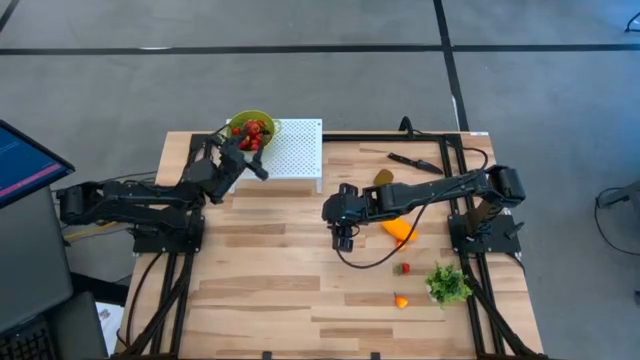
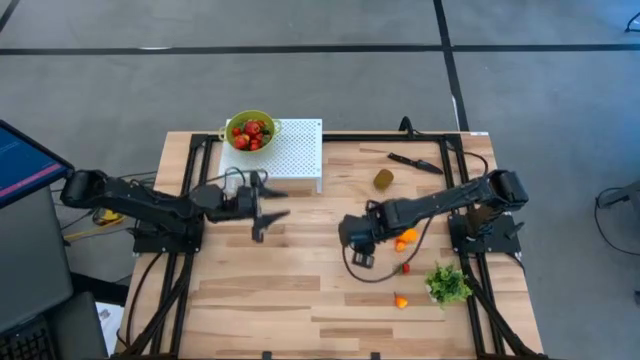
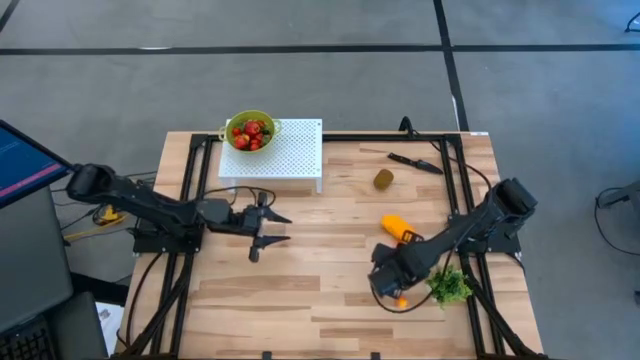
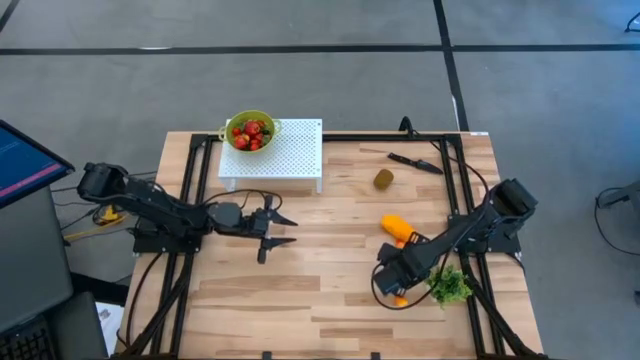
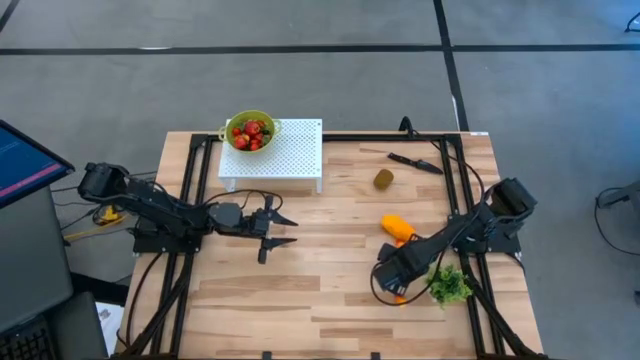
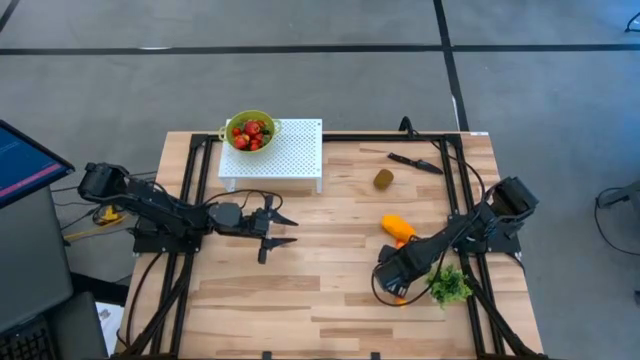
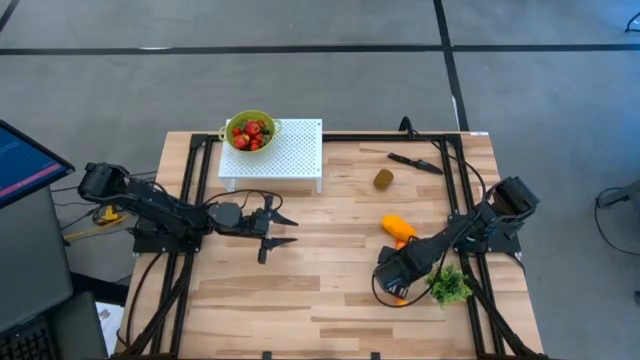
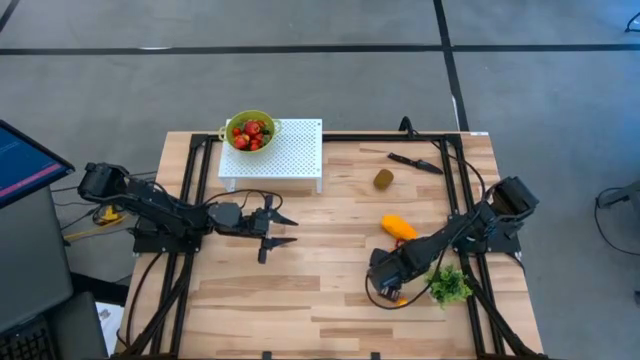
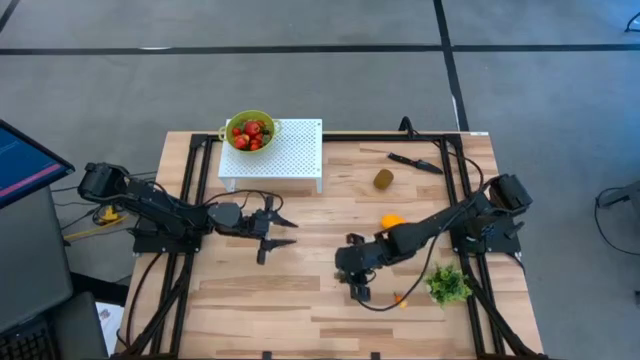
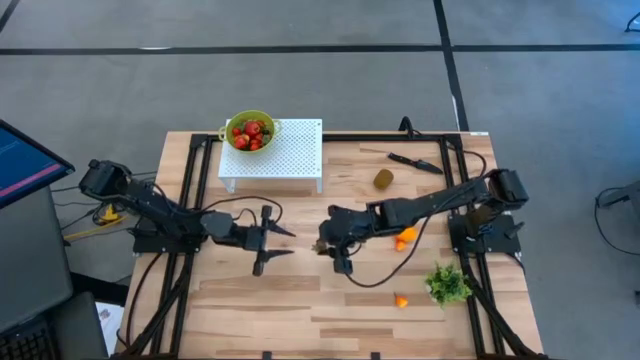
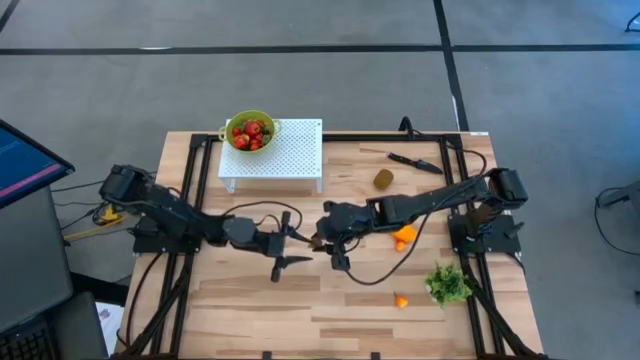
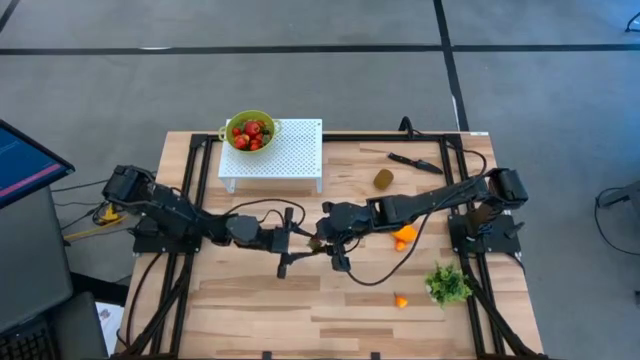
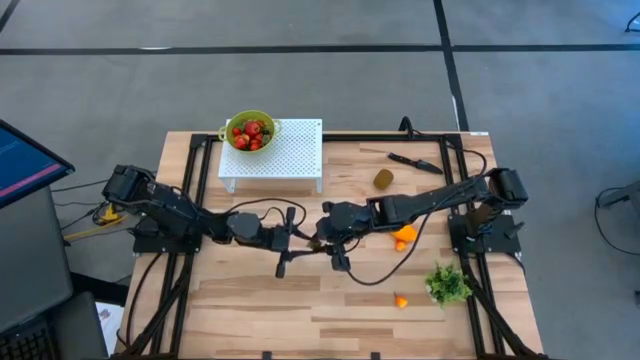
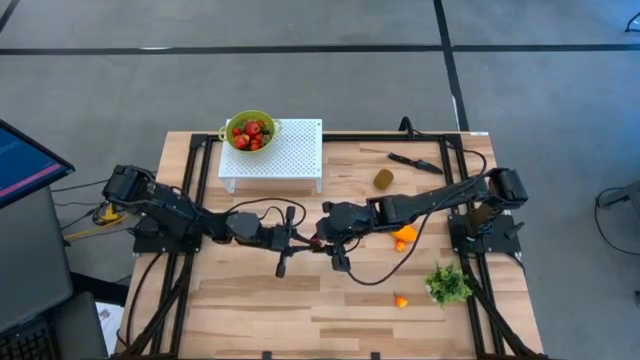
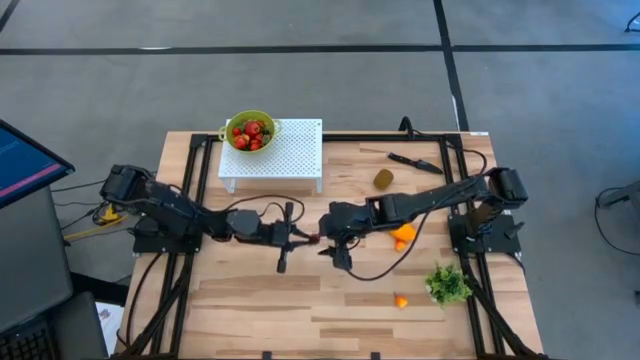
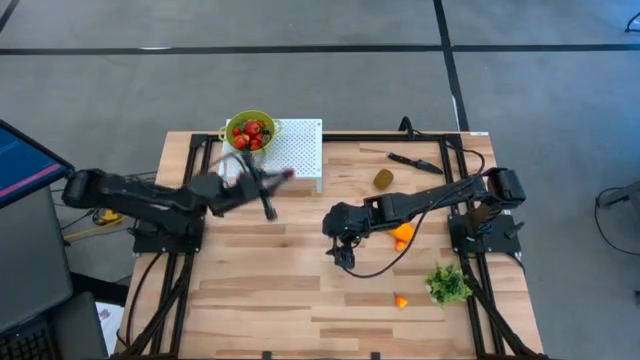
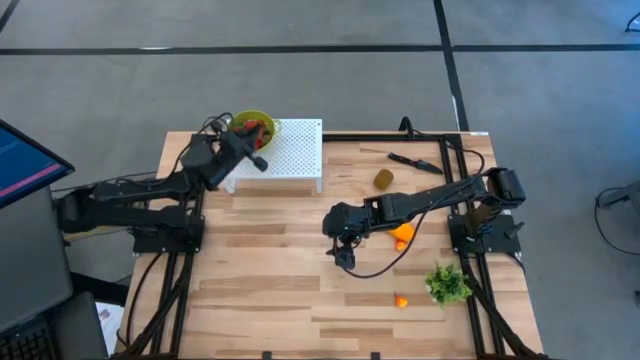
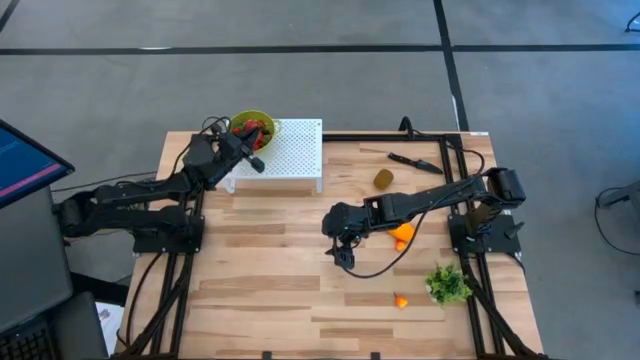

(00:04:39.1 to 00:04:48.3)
Task: Pick & Place Fruit
Put the strawberry into the green strainer bowl on the shelf

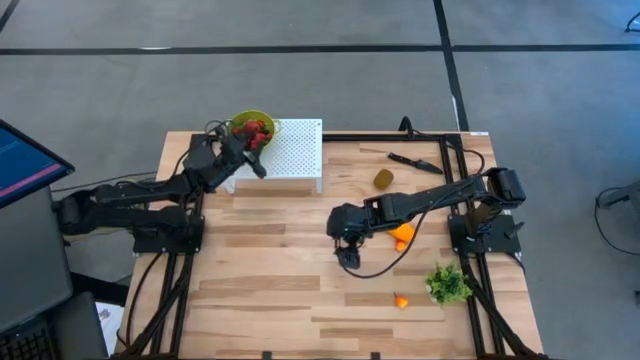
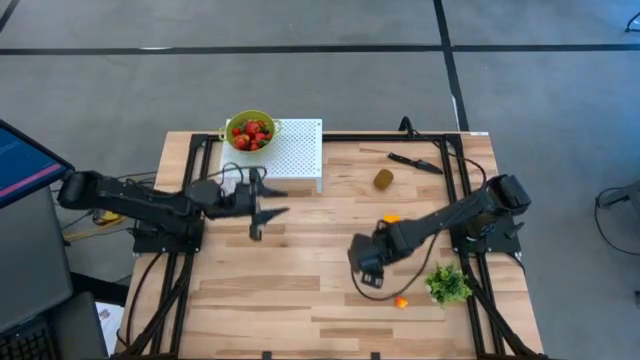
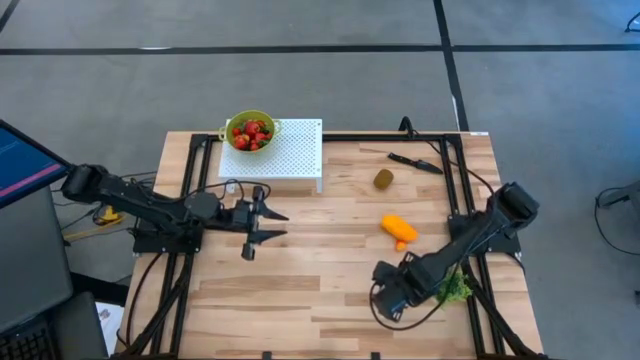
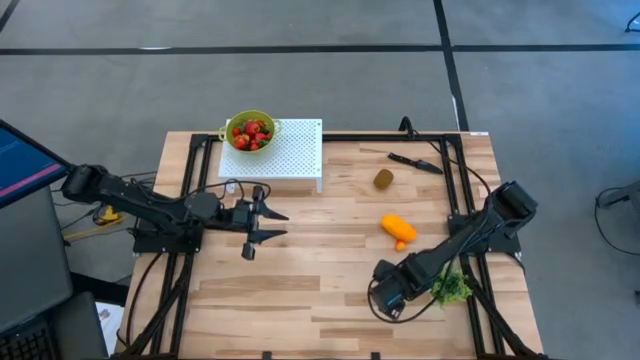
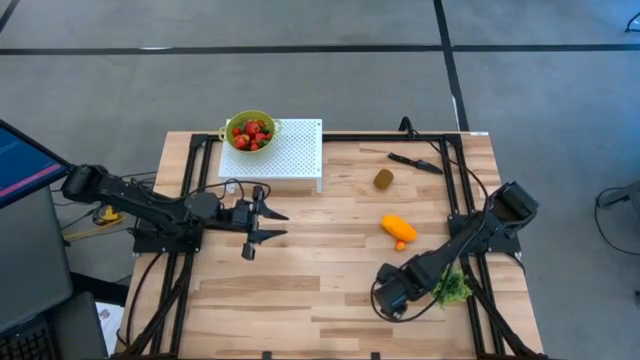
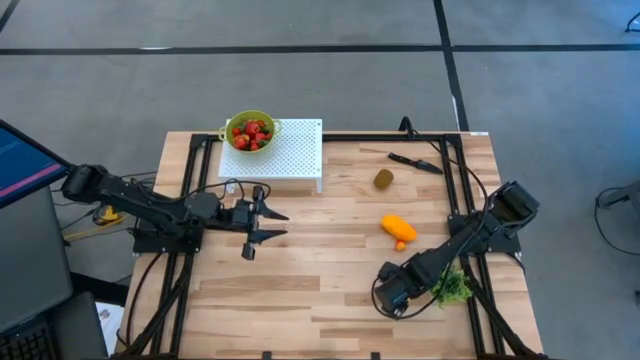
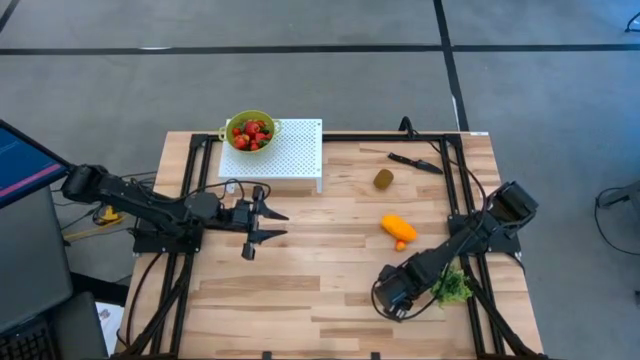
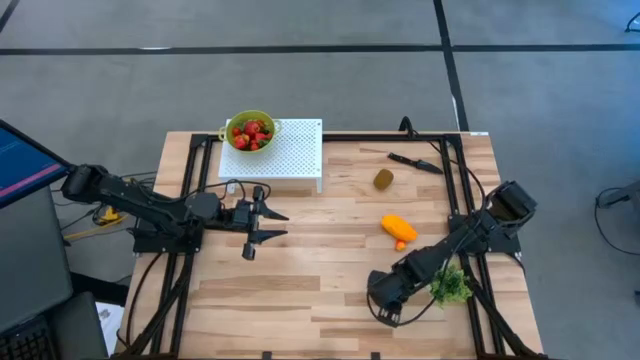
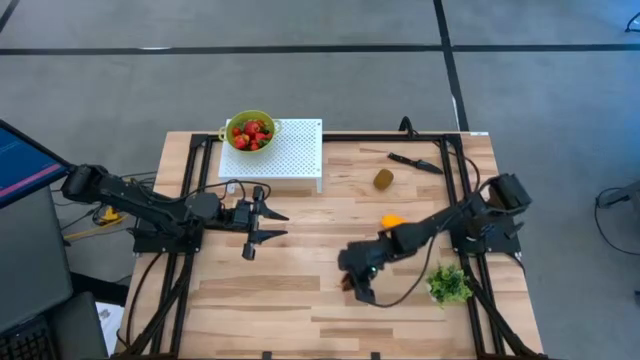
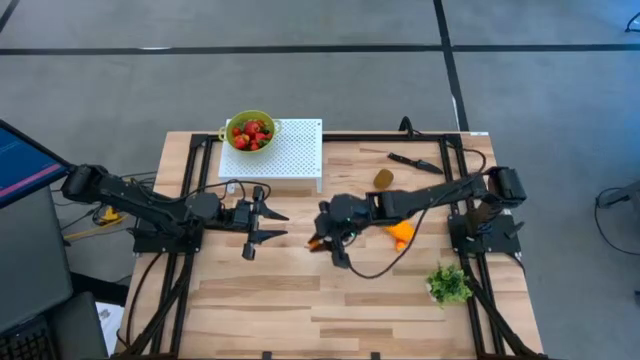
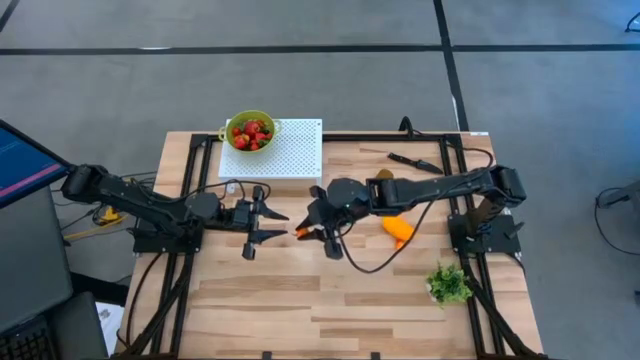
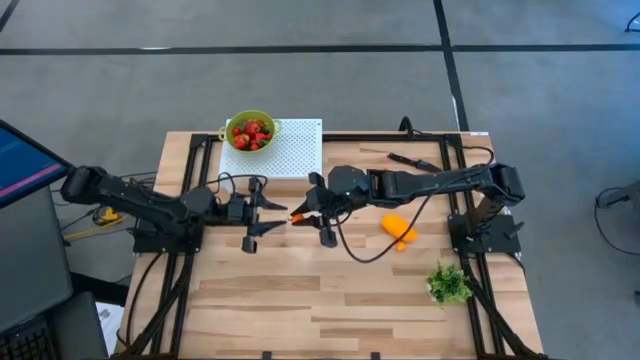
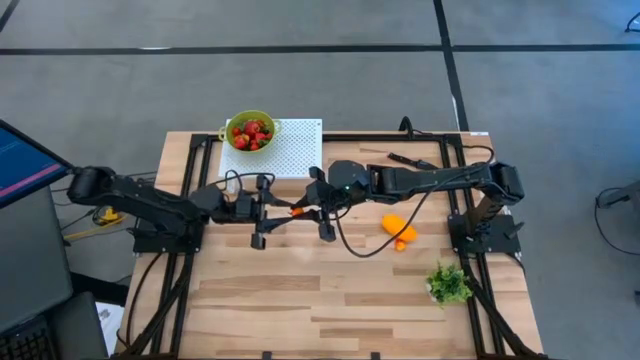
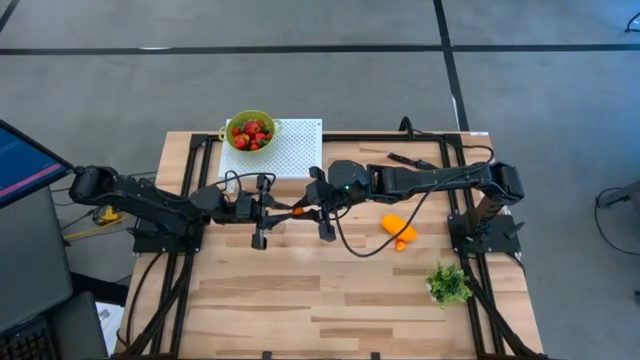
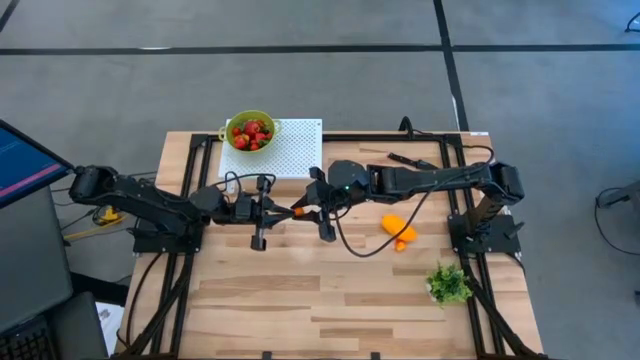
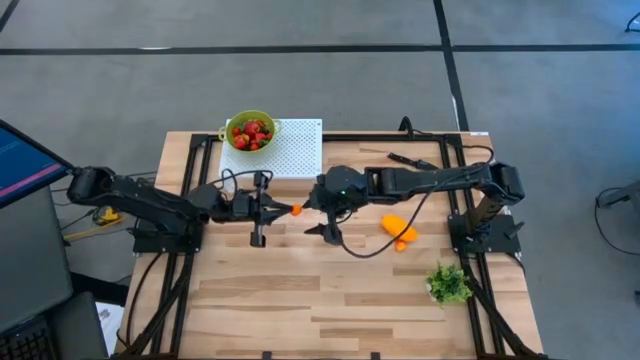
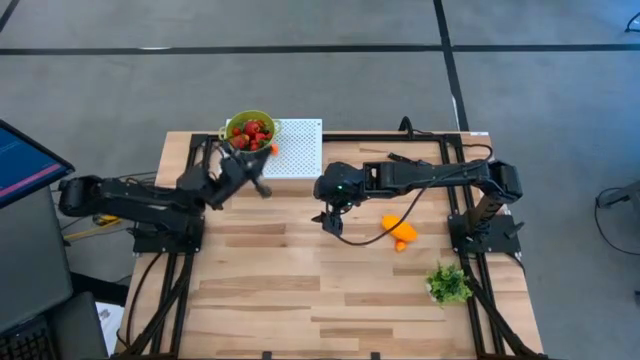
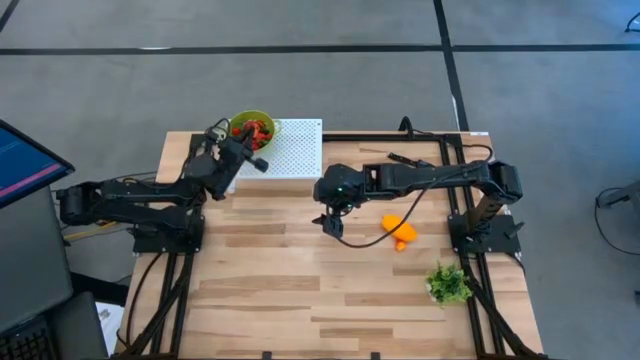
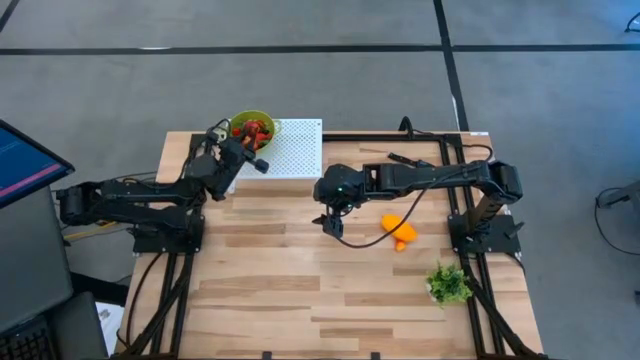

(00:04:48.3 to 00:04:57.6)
Put the peach into the green strainer bowl on the shelf

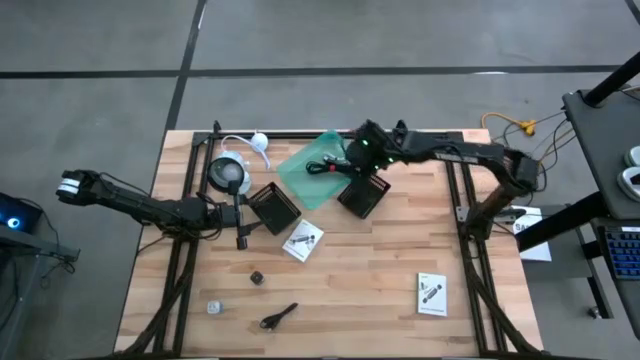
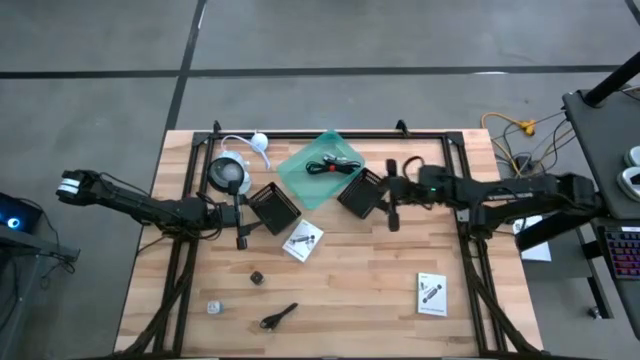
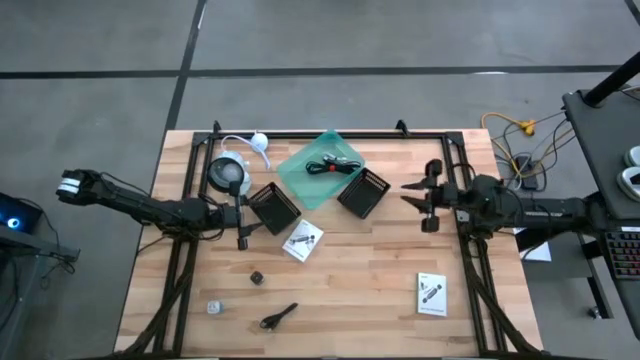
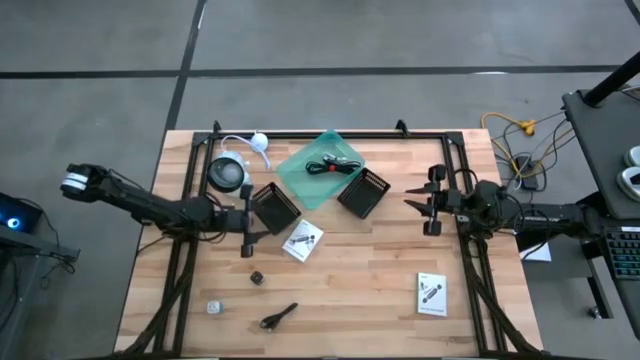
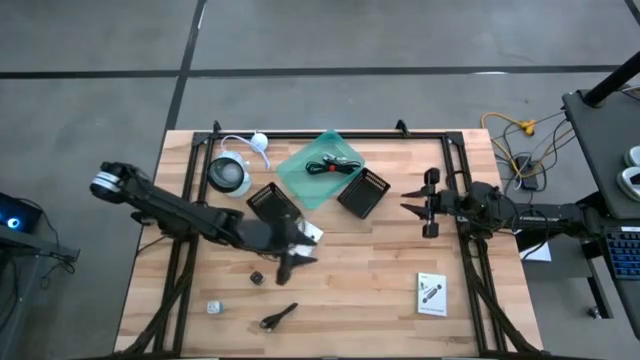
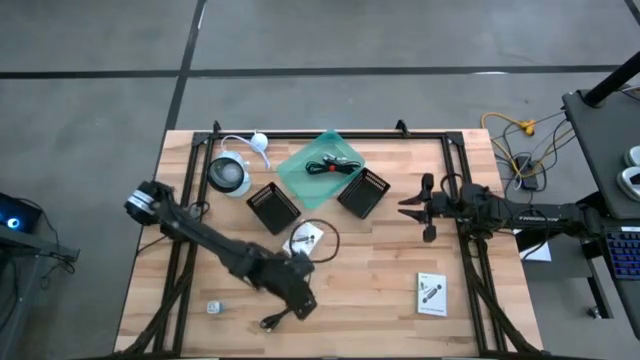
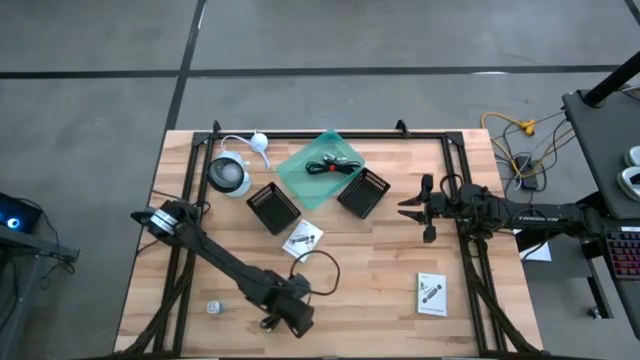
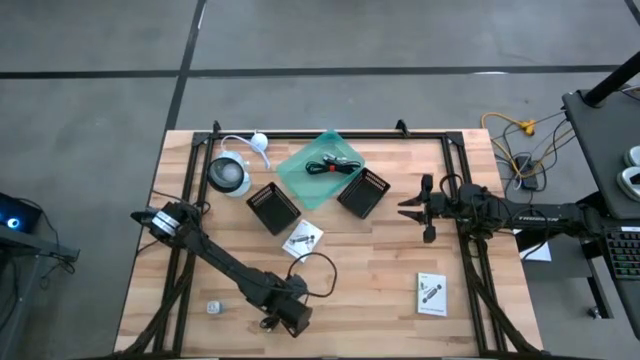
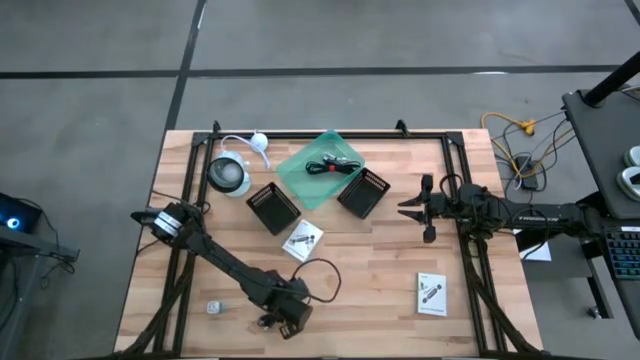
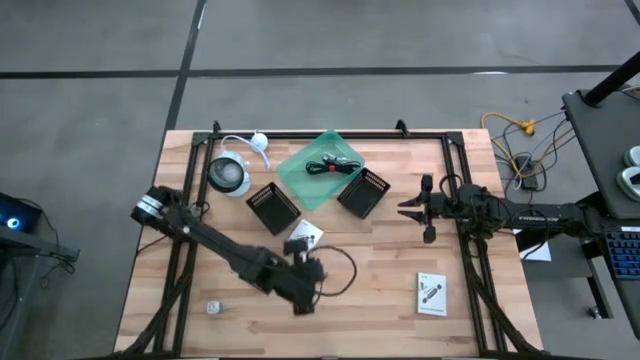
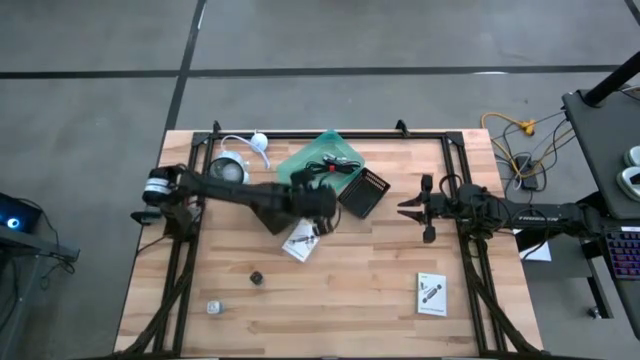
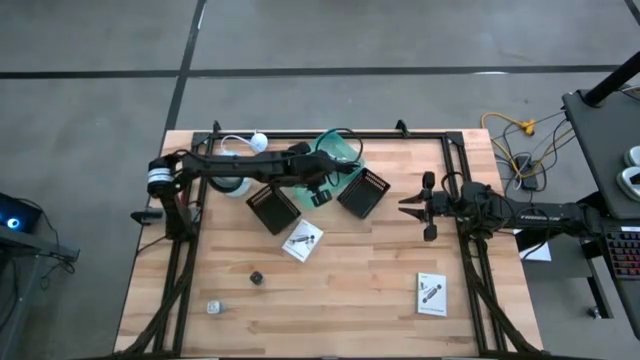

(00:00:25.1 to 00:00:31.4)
Task: Pick and place items into bin
Put the black charger cable into the green bin
